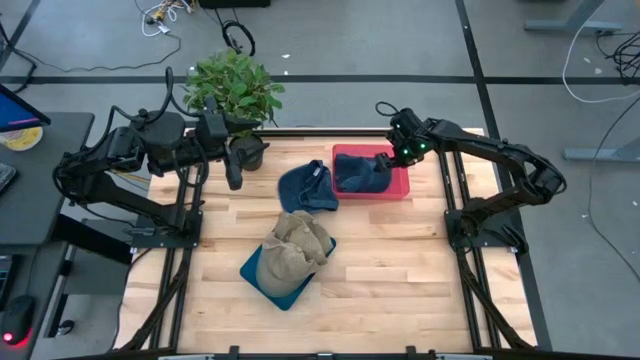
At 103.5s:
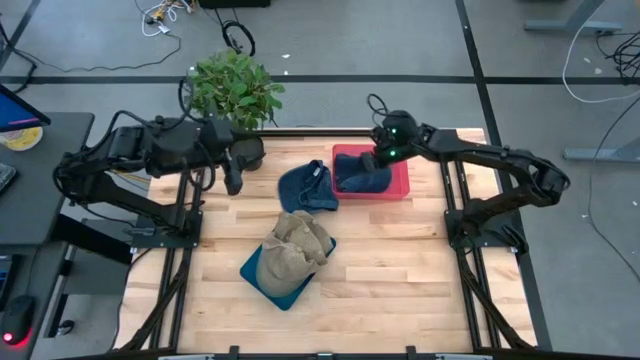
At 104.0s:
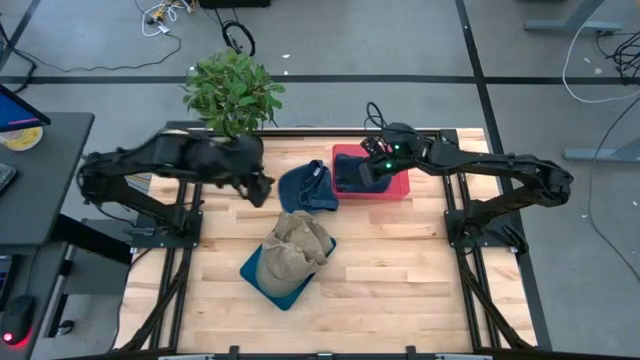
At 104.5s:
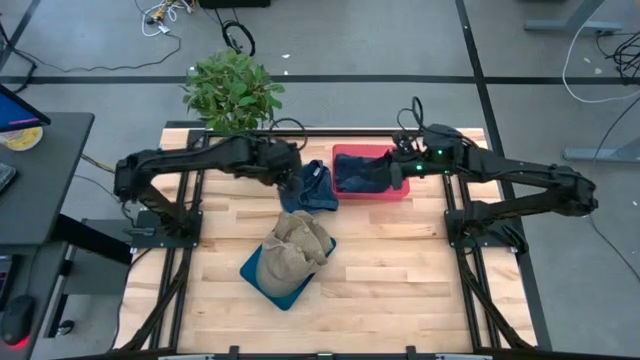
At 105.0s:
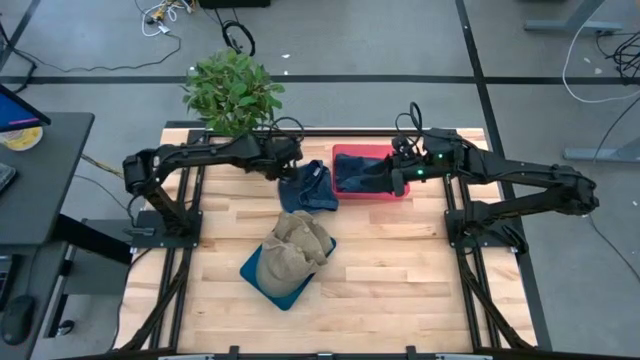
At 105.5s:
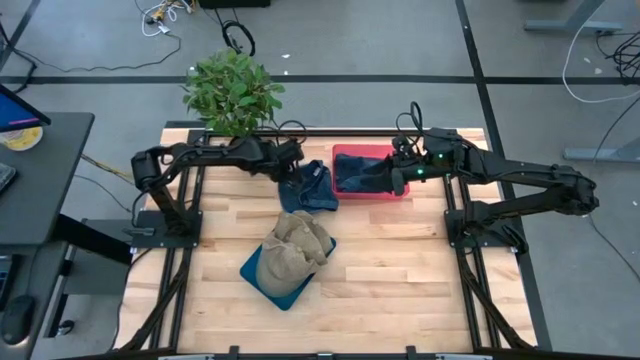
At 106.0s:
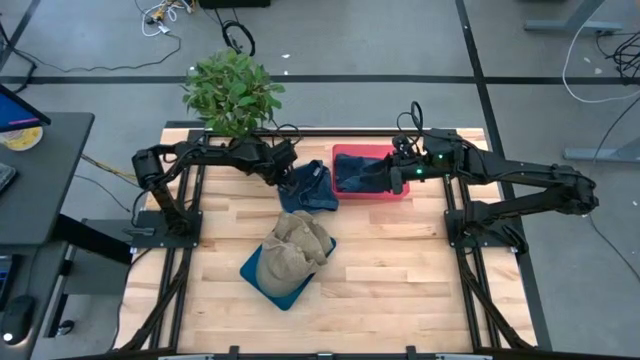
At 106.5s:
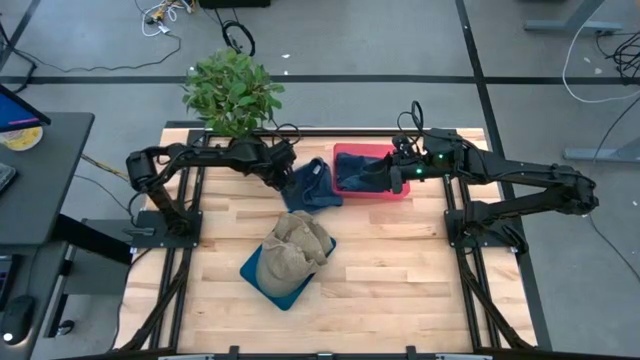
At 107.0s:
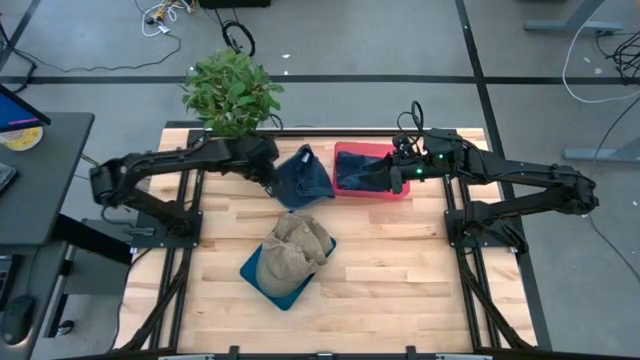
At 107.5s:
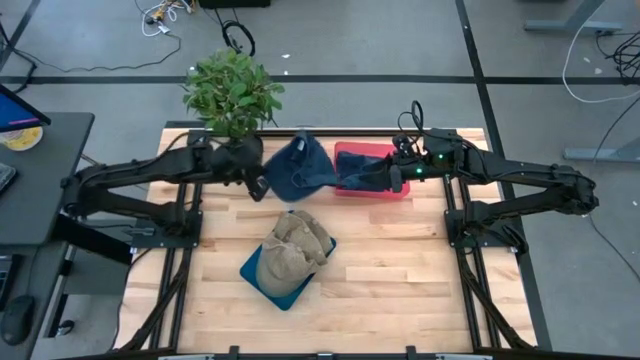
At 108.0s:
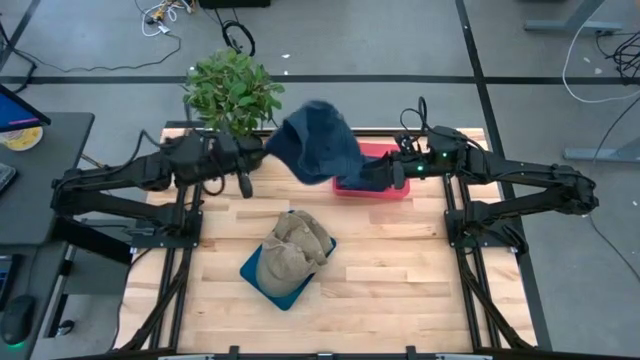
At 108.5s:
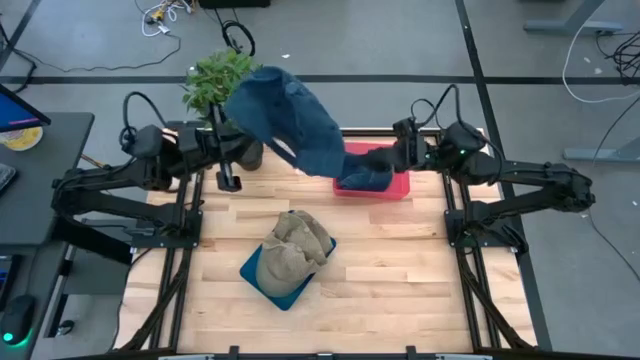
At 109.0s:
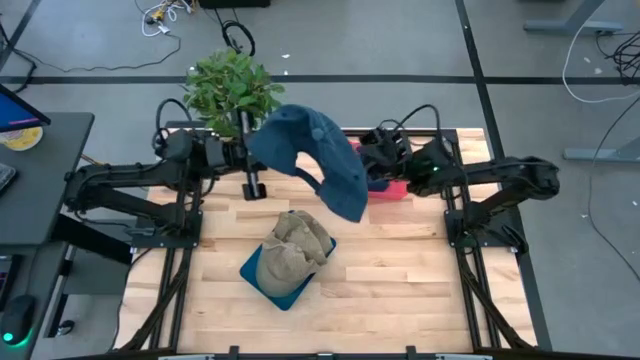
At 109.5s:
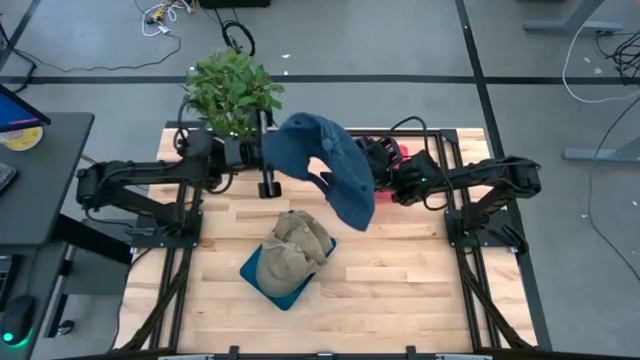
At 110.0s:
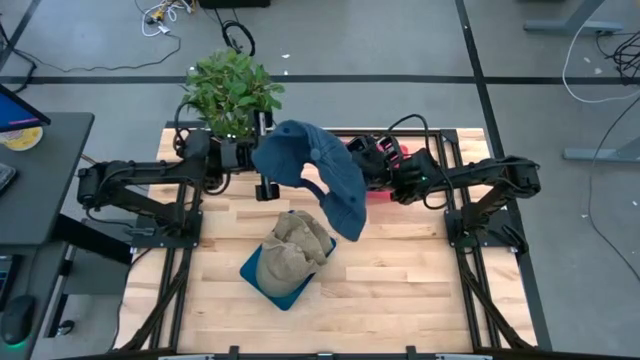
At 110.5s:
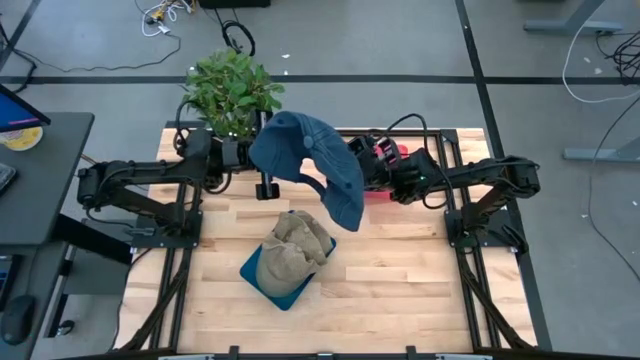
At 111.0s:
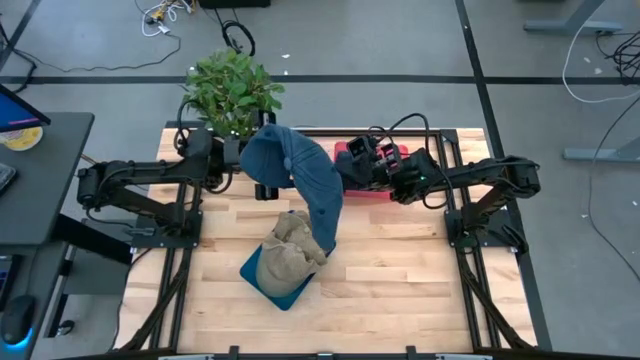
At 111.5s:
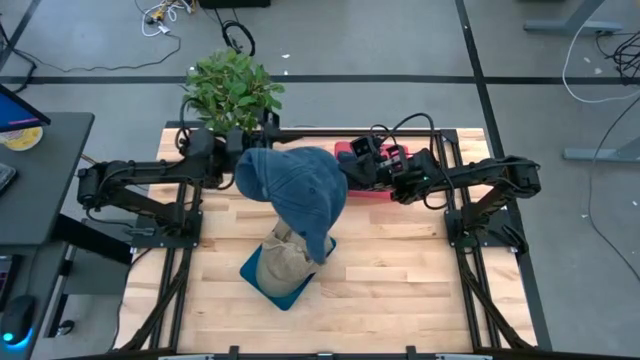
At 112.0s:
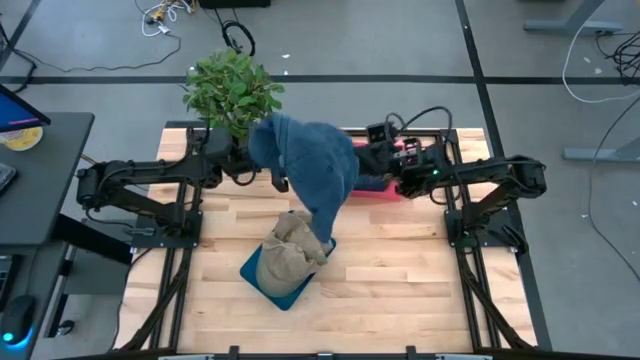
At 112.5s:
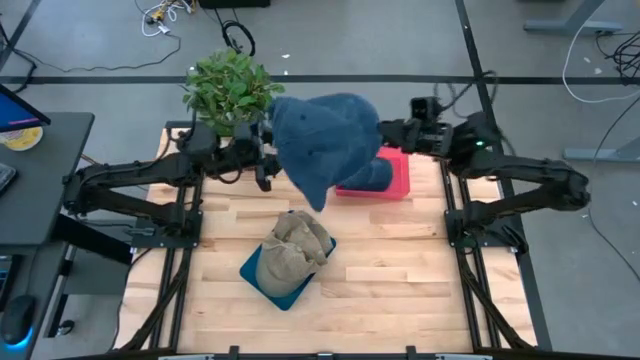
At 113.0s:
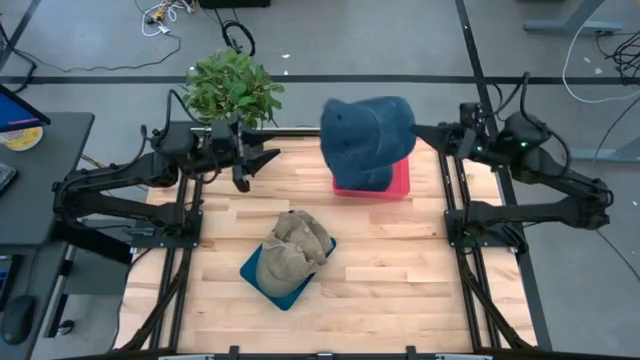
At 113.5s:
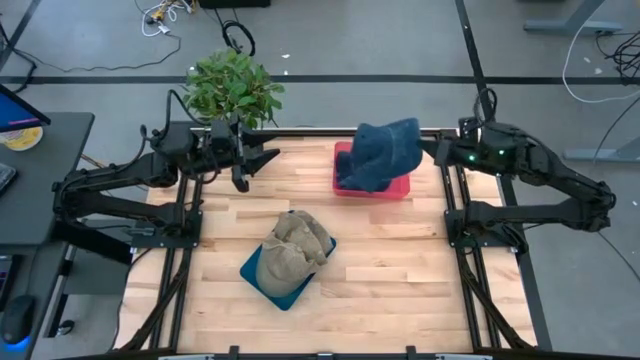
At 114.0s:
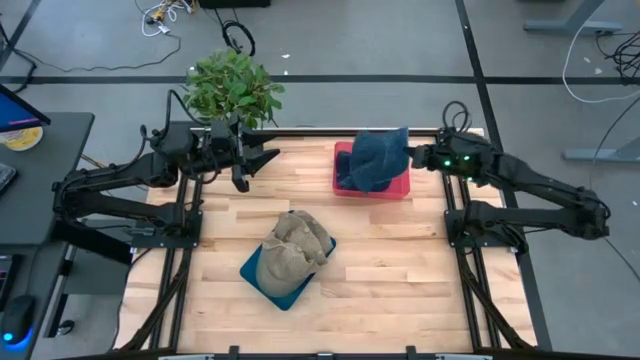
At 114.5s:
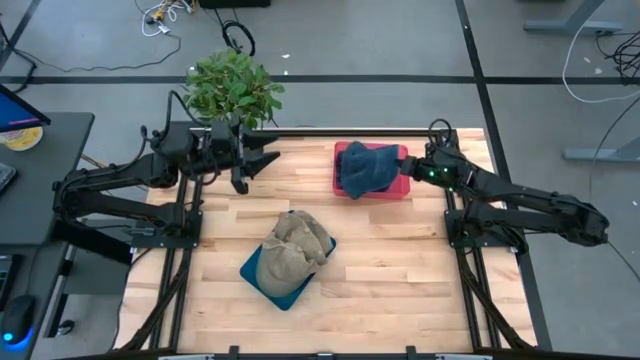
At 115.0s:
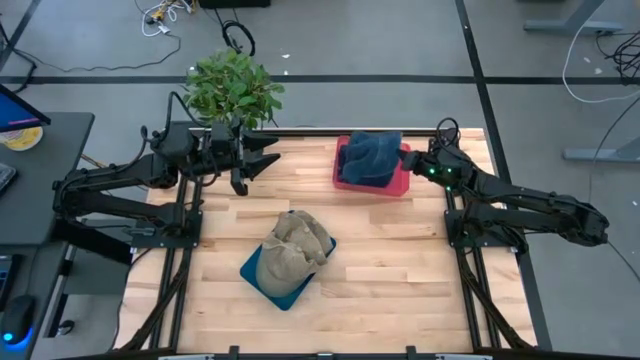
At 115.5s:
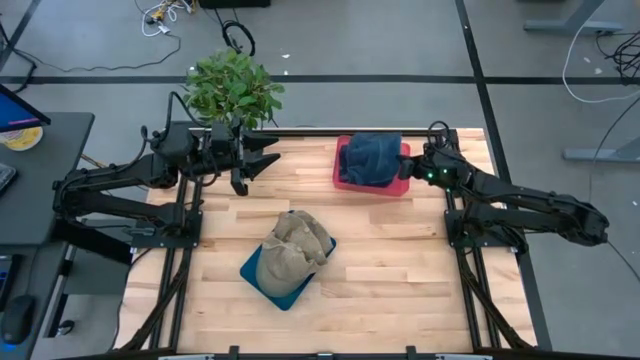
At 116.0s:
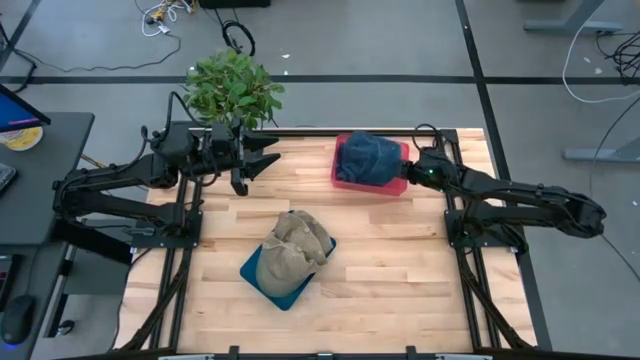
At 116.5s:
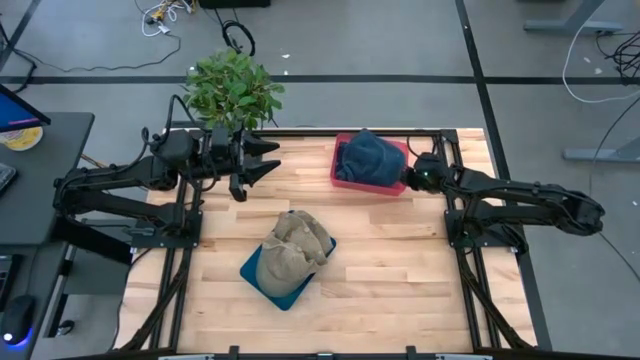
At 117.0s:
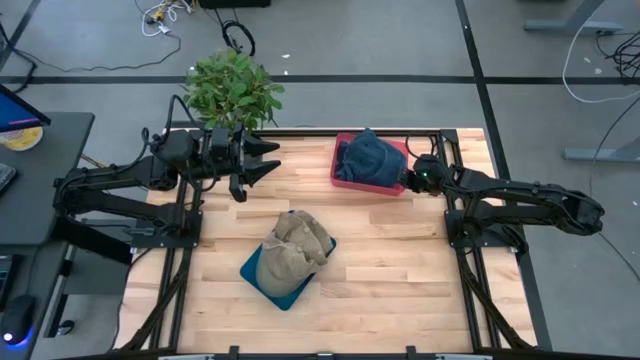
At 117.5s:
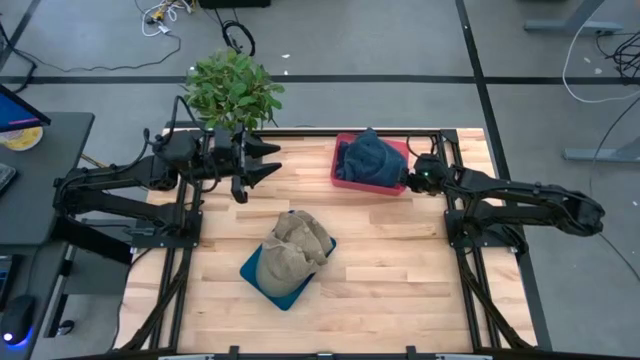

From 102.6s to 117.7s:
Task: Pick & Place hat
Put the blue cap into the pink bin

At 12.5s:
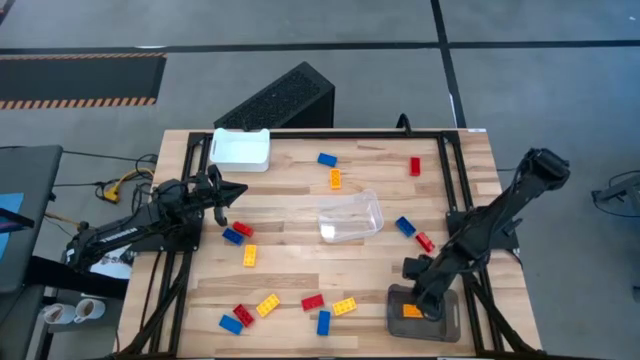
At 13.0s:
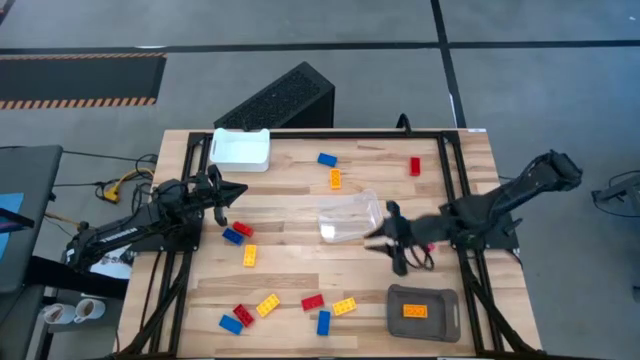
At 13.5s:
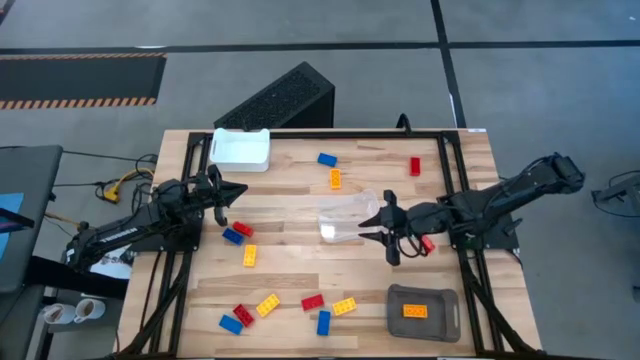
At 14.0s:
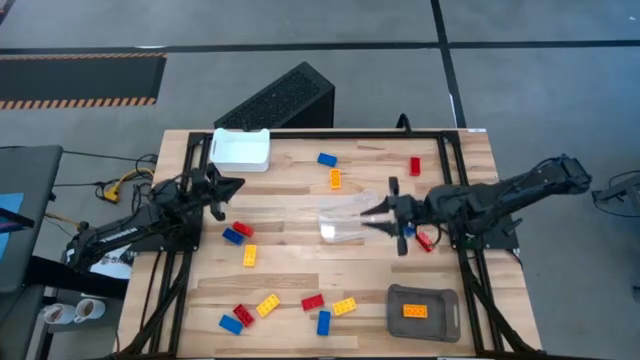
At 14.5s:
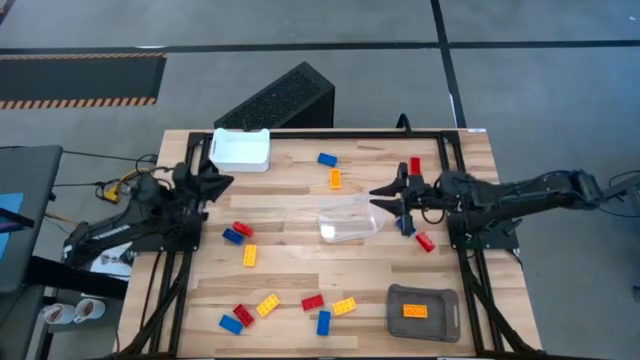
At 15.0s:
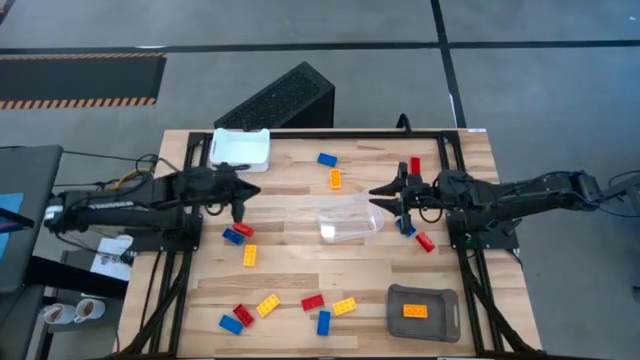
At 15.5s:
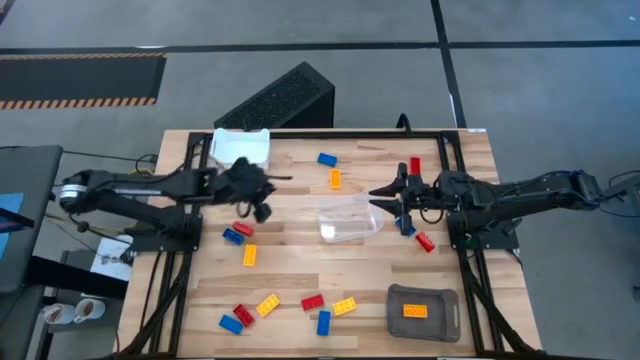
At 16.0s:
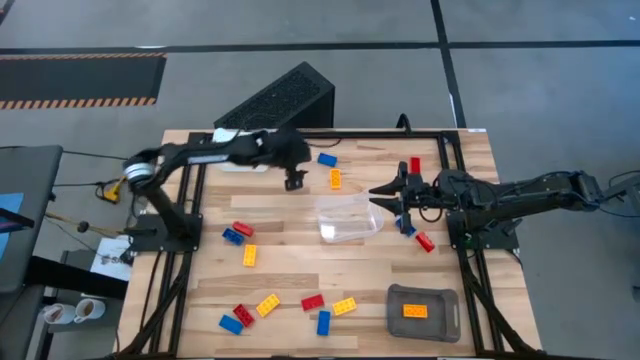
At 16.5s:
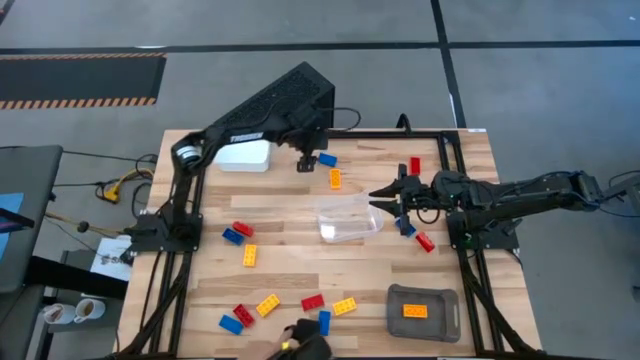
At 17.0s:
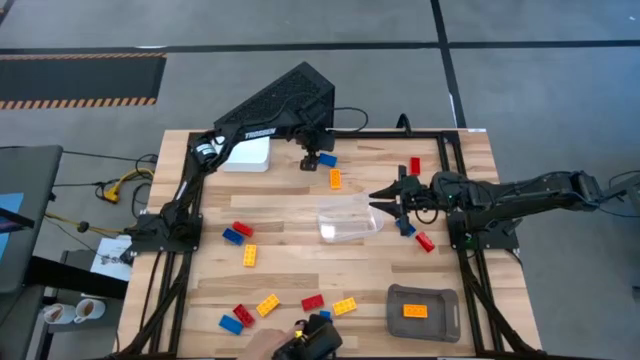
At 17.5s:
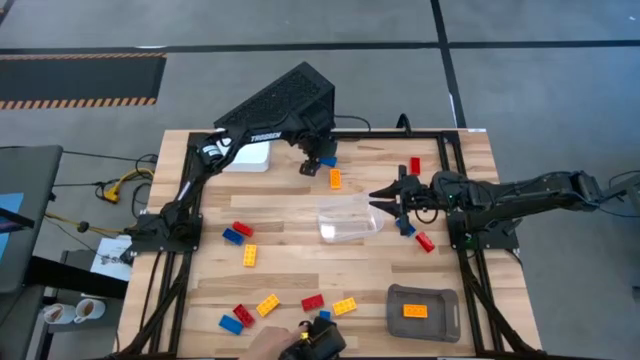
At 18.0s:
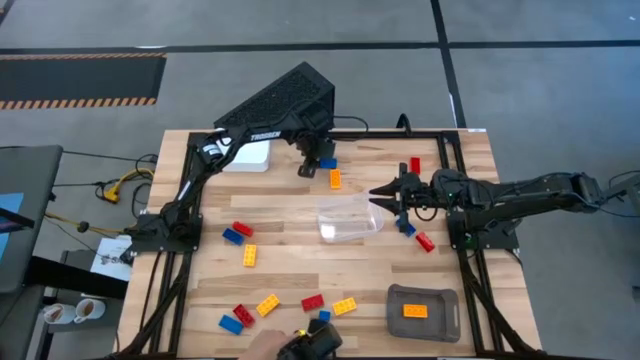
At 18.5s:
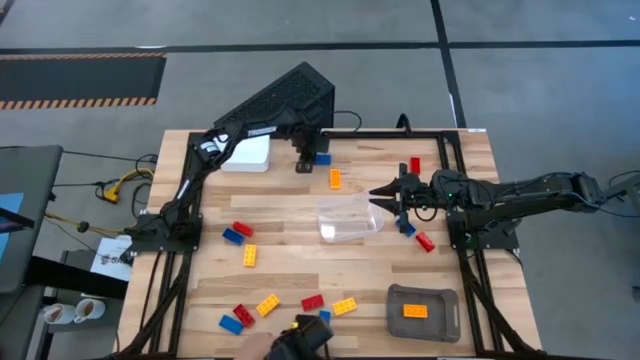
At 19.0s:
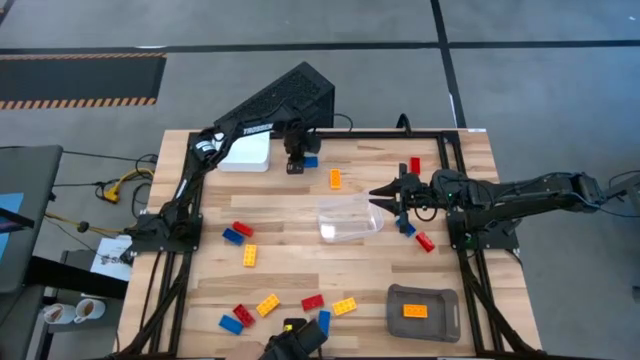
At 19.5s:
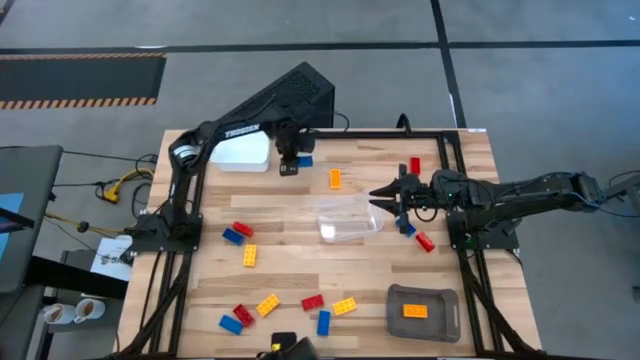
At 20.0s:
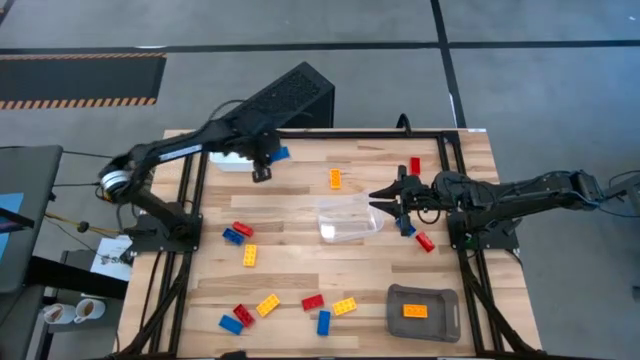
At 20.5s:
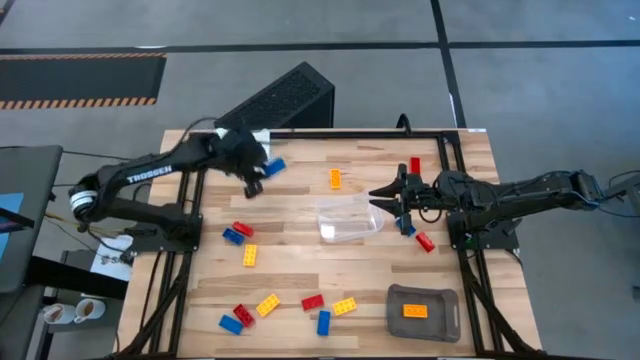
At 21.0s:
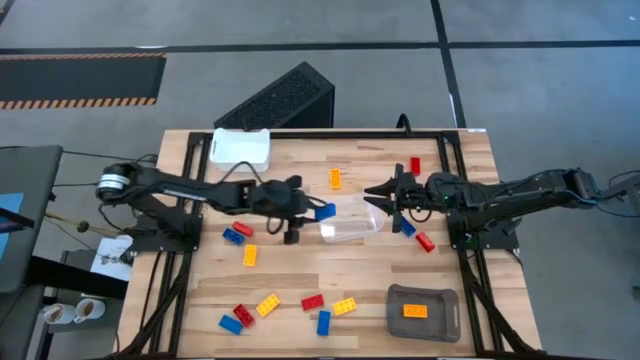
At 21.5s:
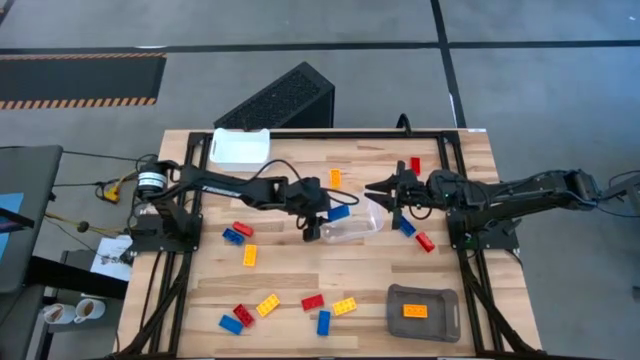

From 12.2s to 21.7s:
Task: Sort & place blocks by color
Put the blue game piece into the transparent bin
